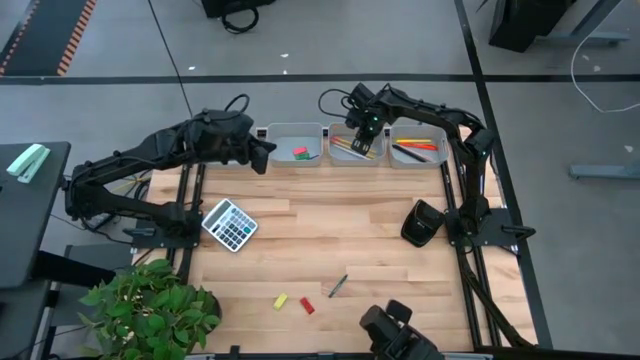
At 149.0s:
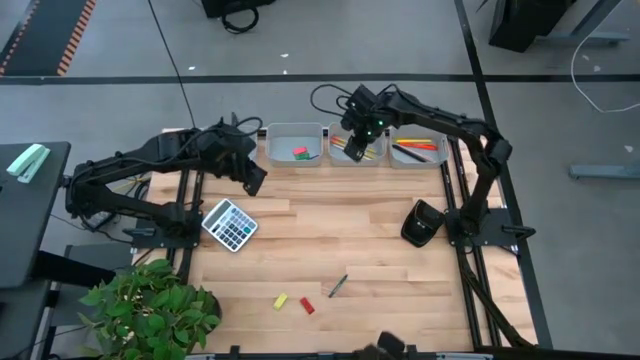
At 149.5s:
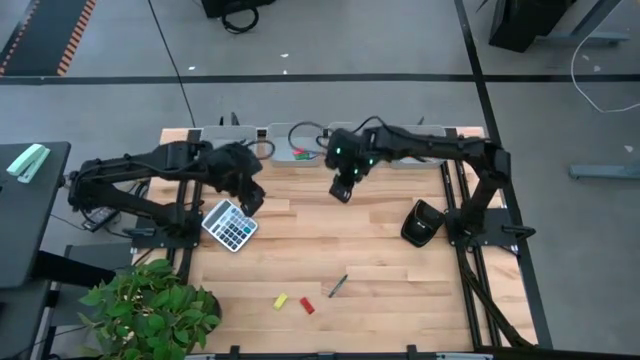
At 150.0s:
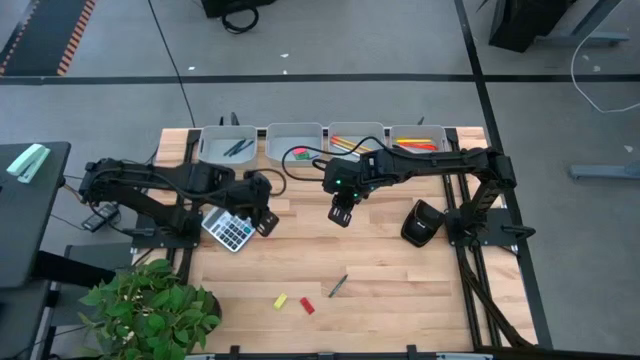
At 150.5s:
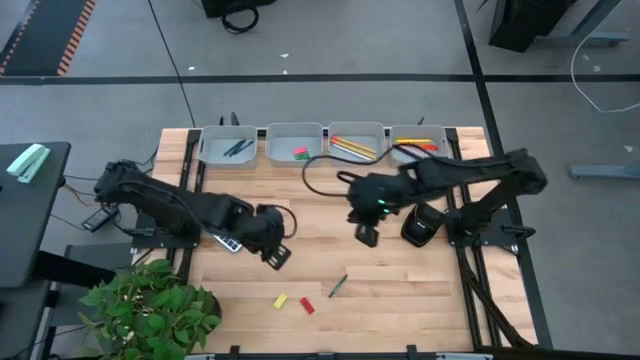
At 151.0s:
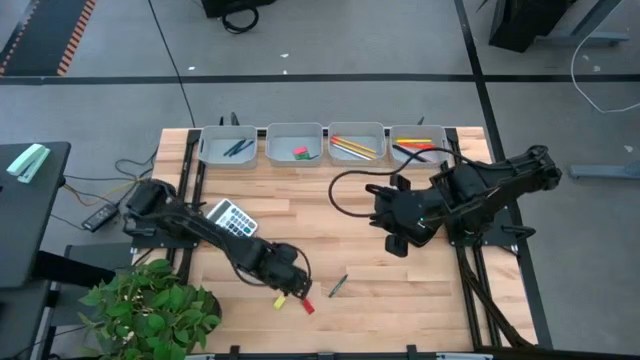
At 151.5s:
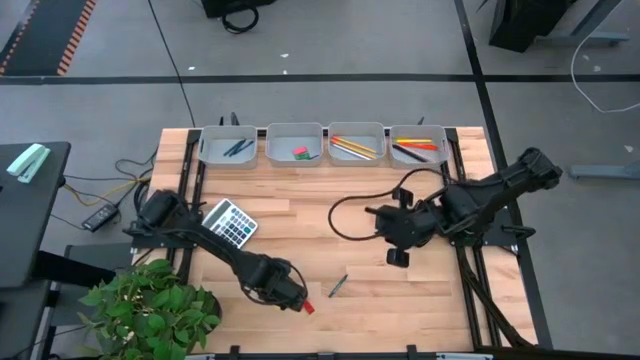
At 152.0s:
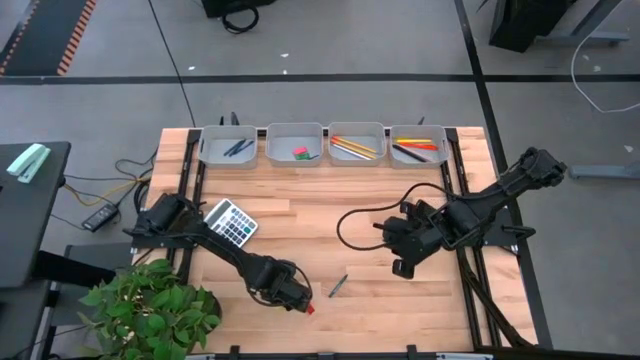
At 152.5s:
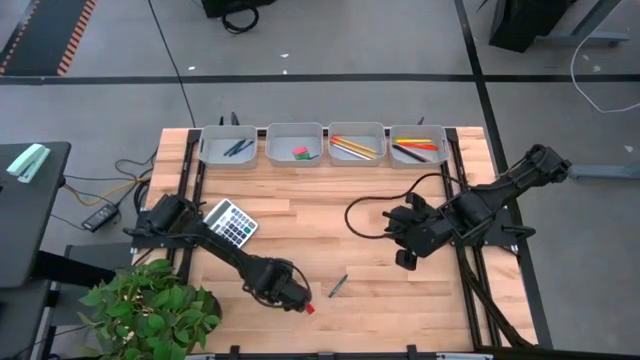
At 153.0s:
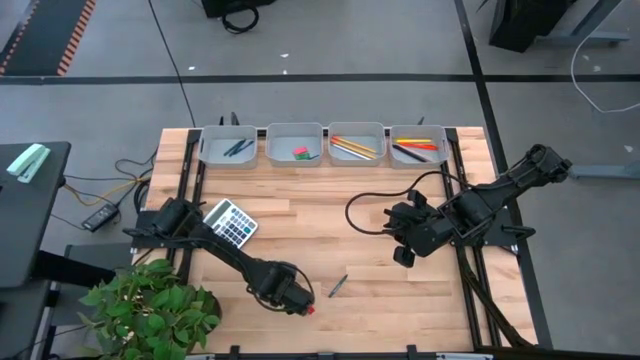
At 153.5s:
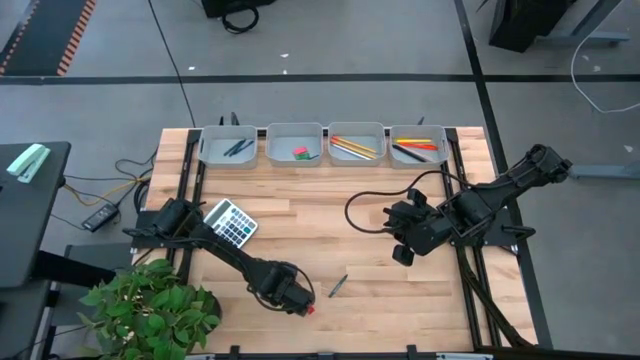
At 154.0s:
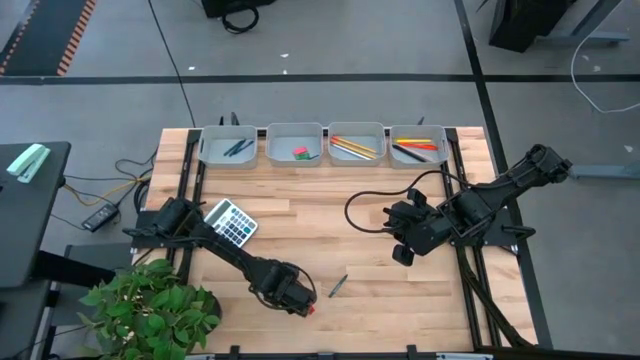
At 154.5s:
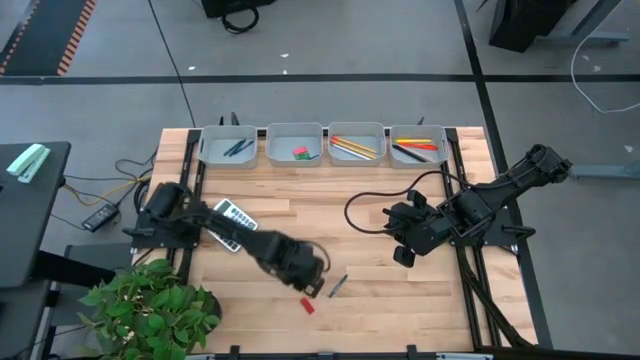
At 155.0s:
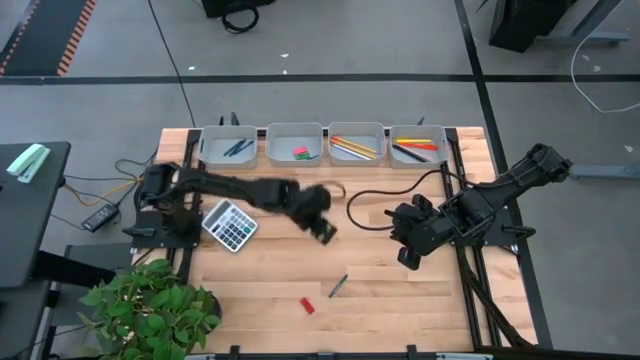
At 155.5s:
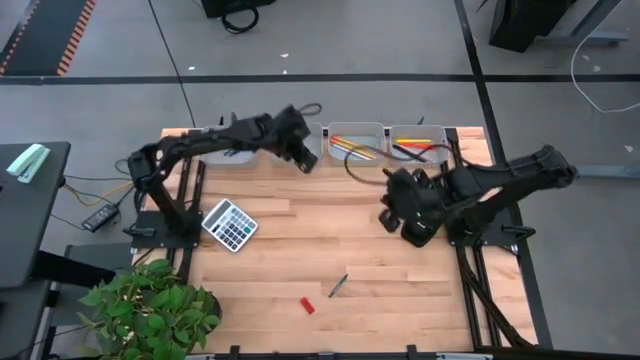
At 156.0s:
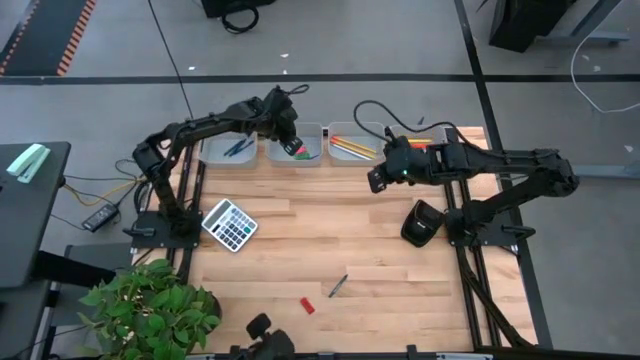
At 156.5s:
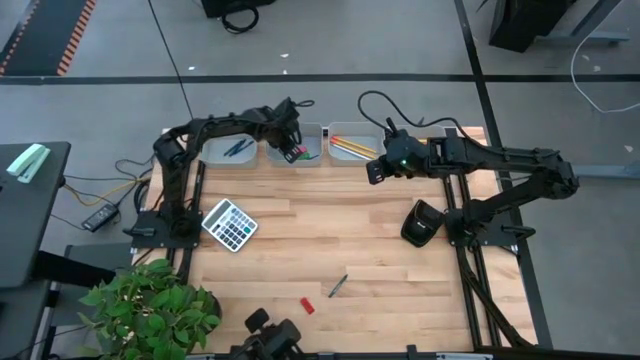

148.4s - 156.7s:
Task: Sort crayons/erasers/pens/pencils in bins
Put the yellow eraser into the gray bin

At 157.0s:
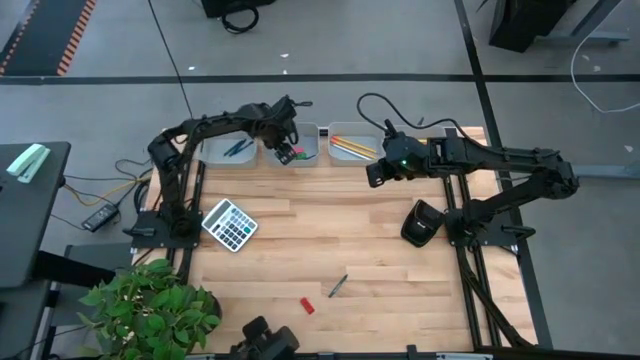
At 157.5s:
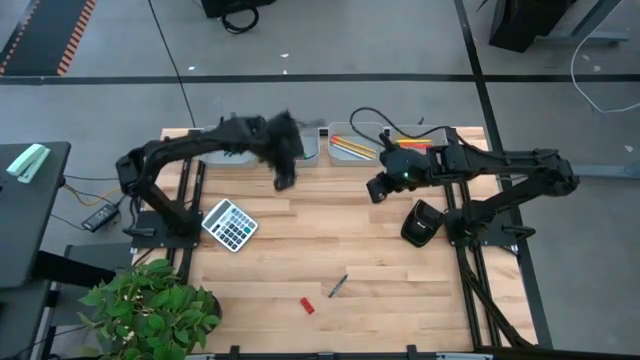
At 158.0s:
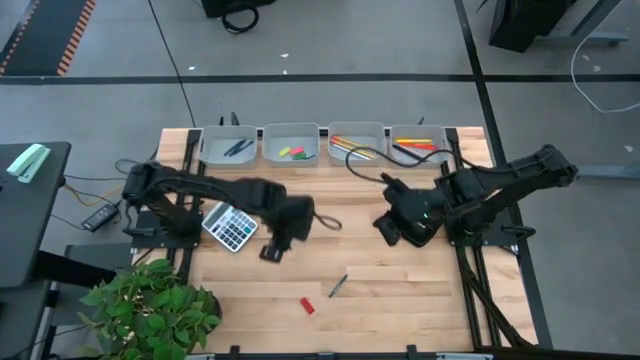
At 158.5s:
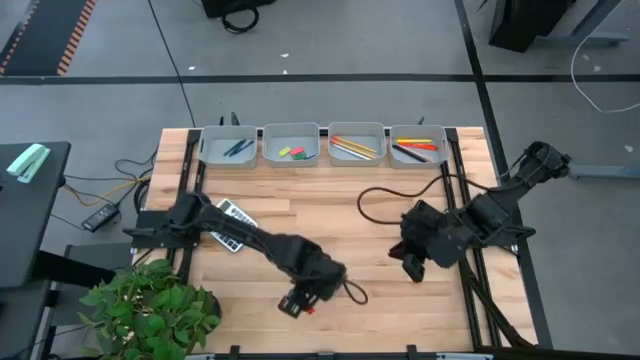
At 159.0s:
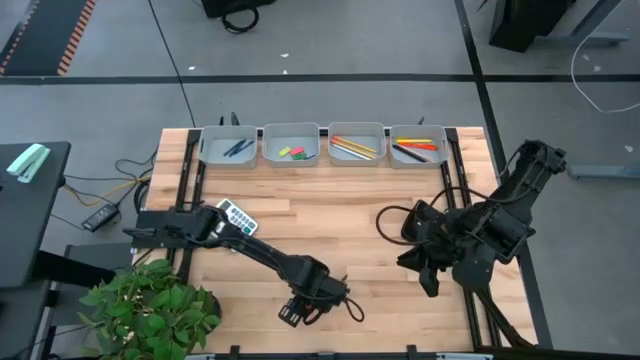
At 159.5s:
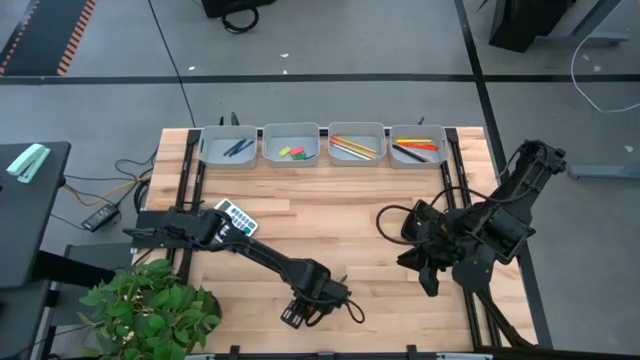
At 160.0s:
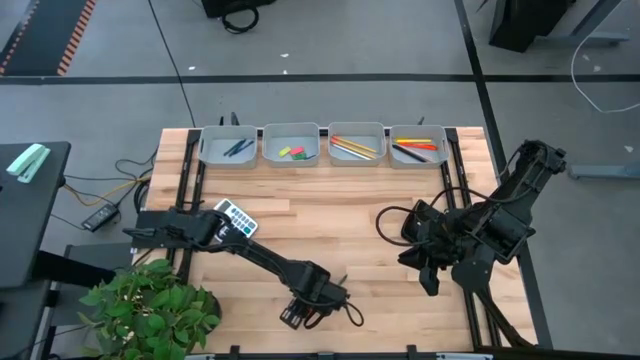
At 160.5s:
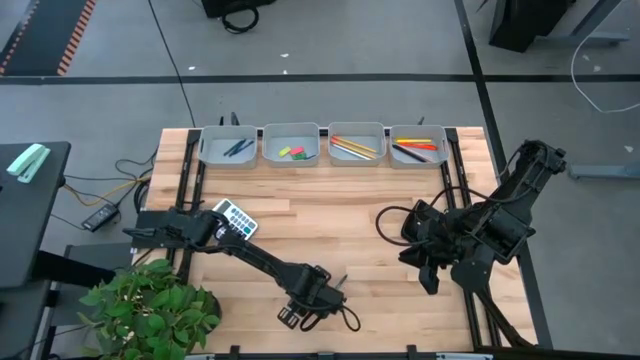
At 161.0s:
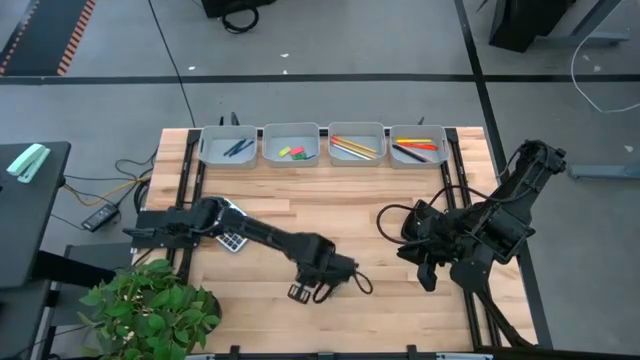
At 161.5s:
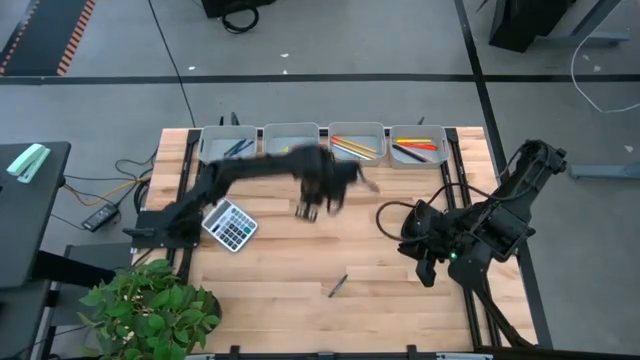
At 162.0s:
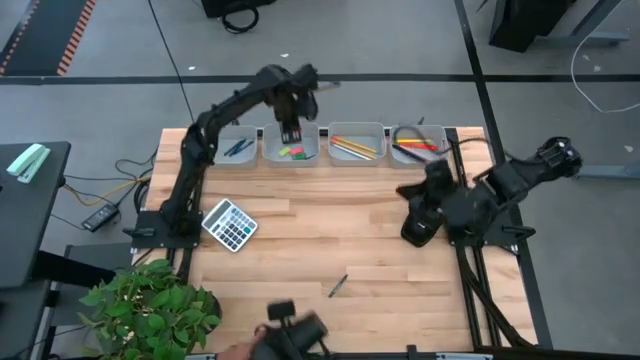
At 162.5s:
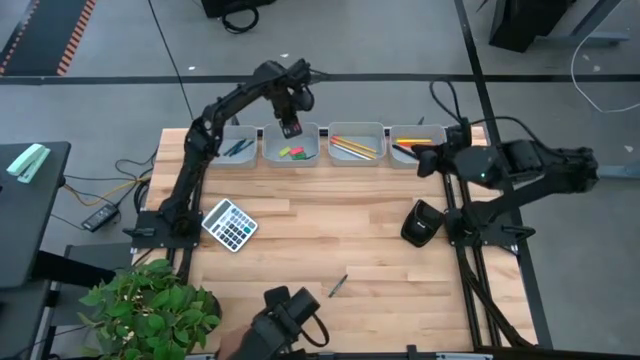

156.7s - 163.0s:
Put the red eraser into the gray bin

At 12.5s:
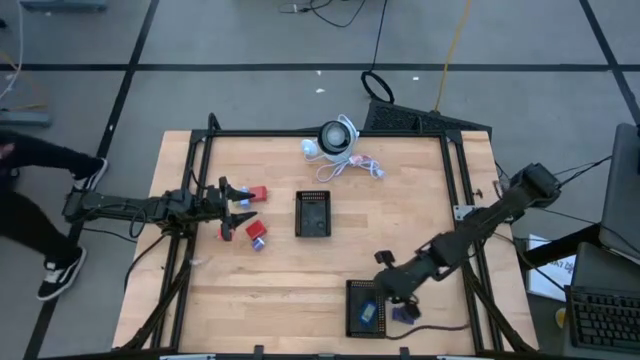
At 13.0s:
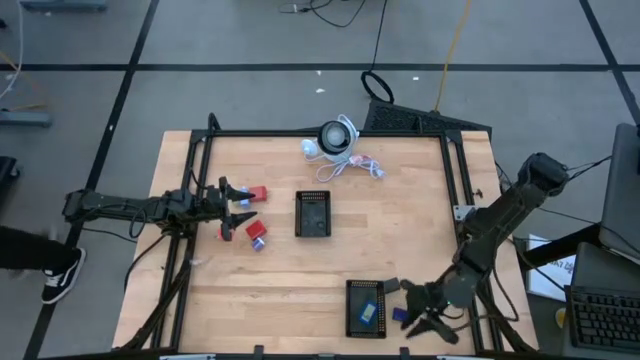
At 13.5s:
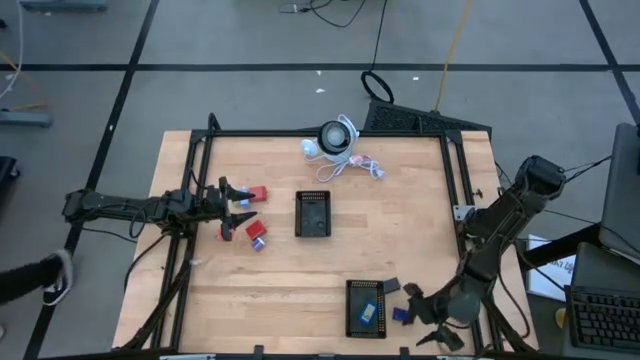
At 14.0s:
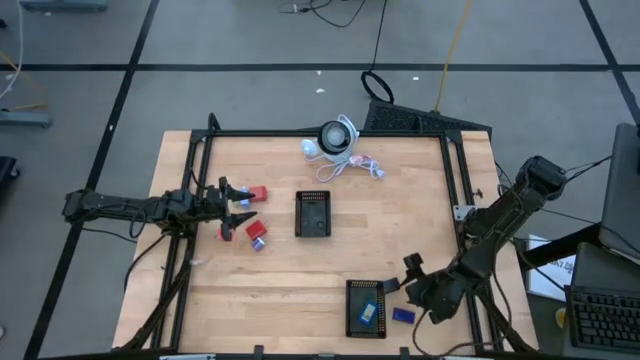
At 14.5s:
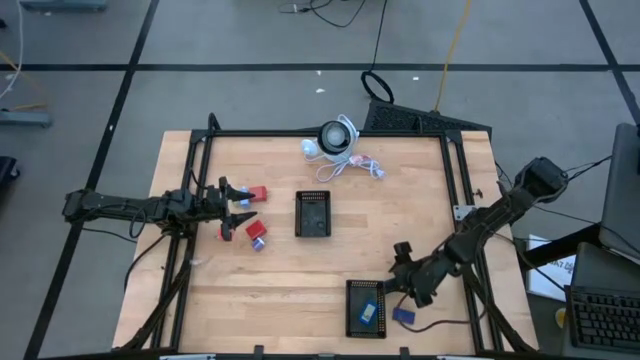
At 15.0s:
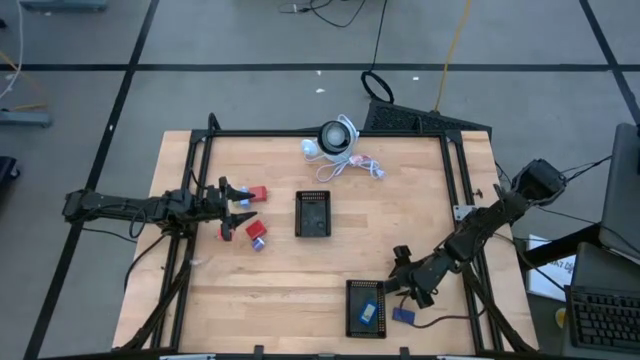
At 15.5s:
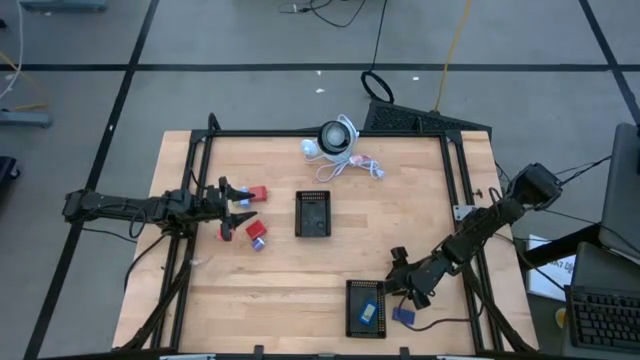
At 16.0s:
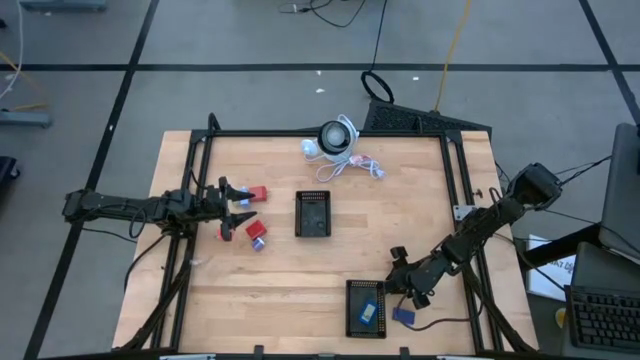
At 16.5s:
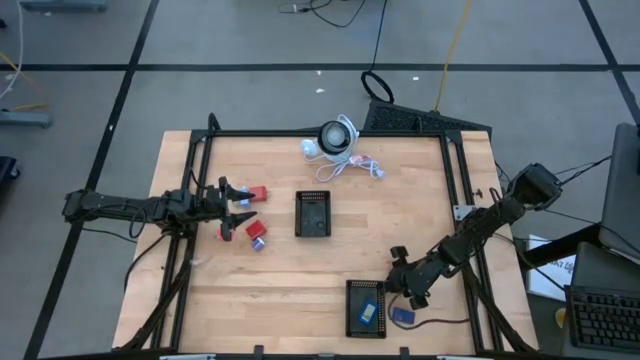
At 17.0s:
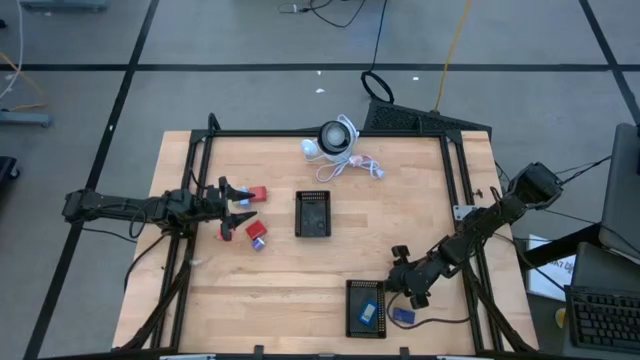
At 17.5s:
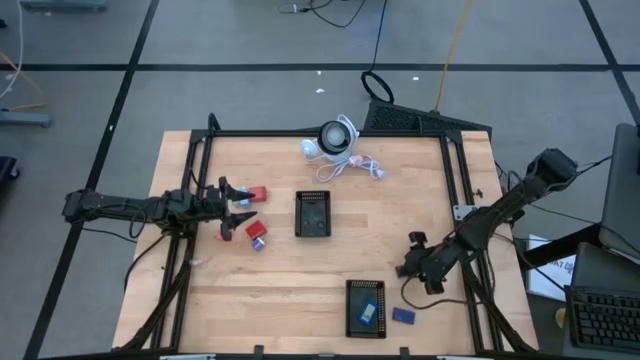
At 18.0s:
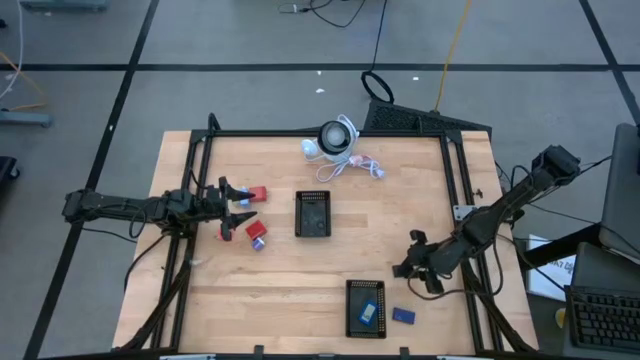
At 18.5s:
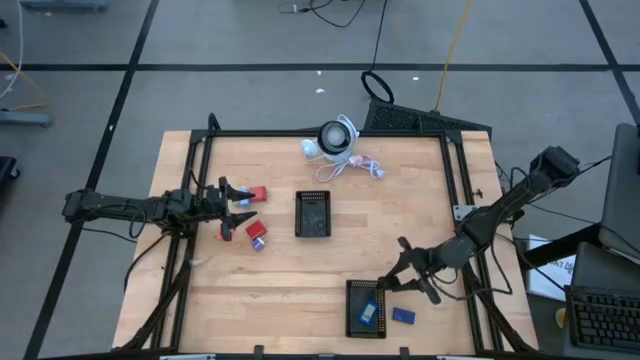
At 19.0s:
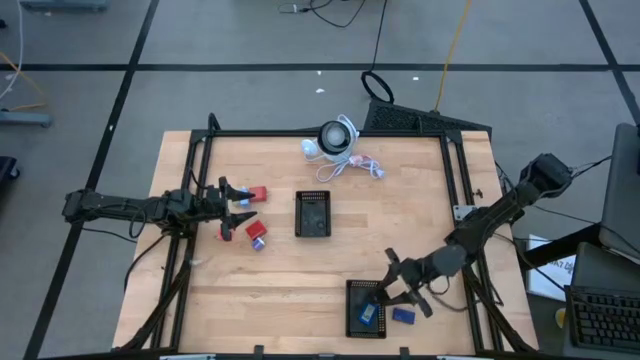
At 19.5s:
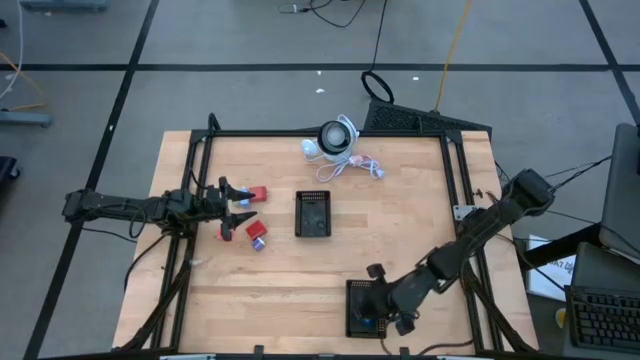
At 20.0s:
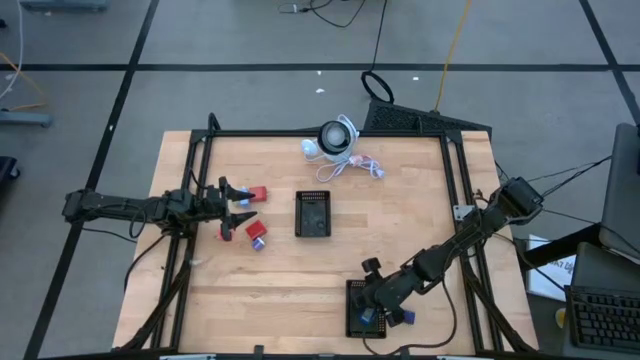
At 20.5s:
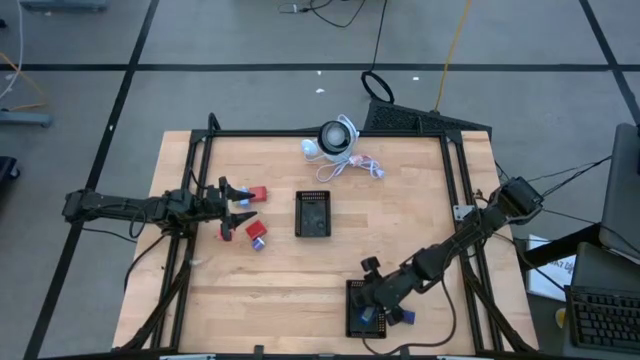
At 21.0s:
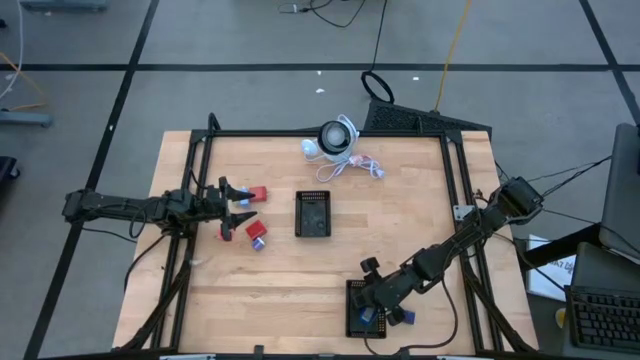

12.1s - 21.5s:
Task: Pick & Place Office items
Put the black digital timer into the bottom black basket
